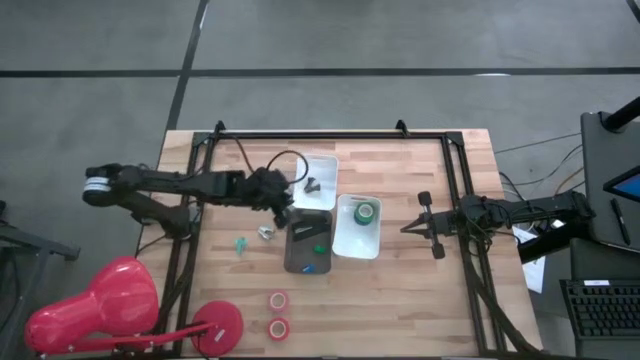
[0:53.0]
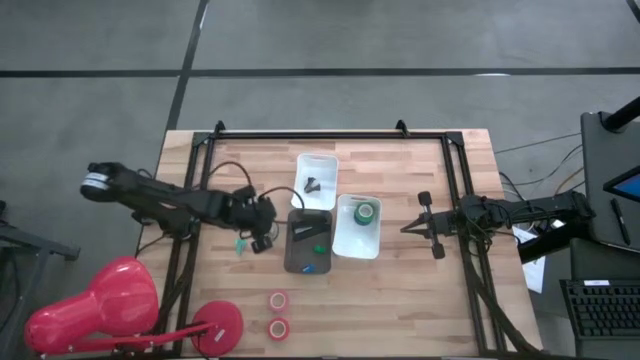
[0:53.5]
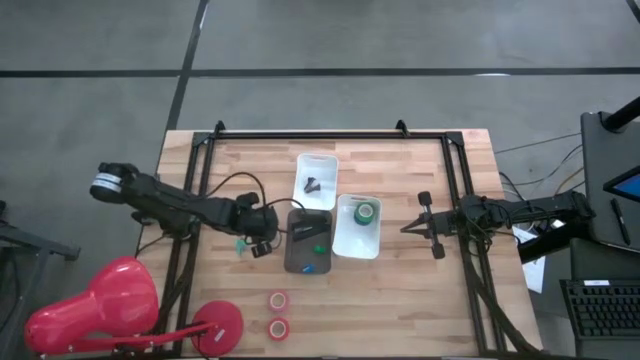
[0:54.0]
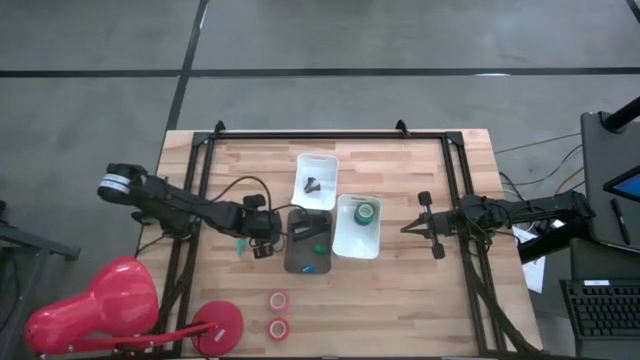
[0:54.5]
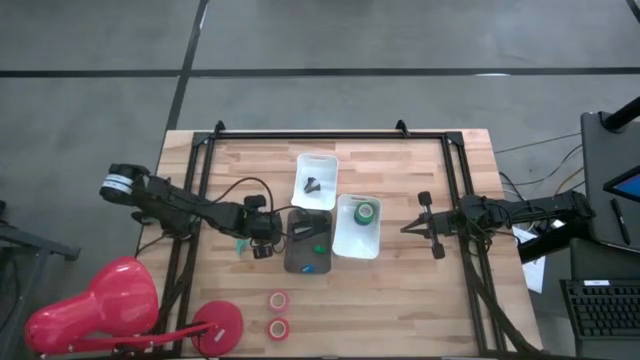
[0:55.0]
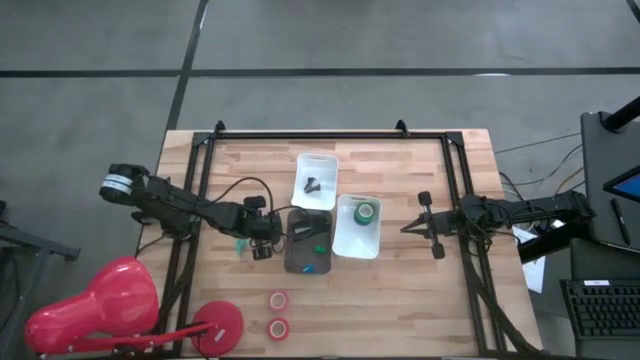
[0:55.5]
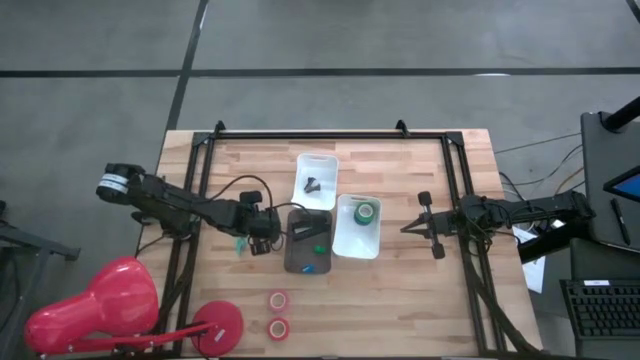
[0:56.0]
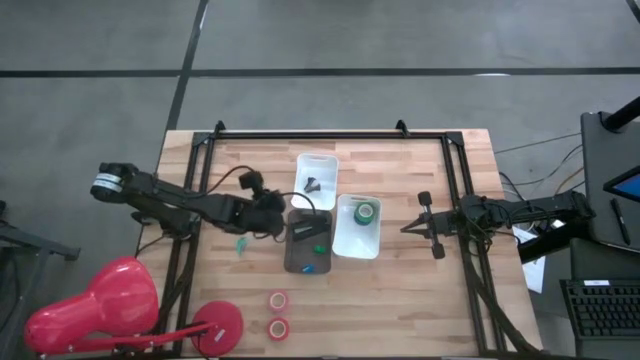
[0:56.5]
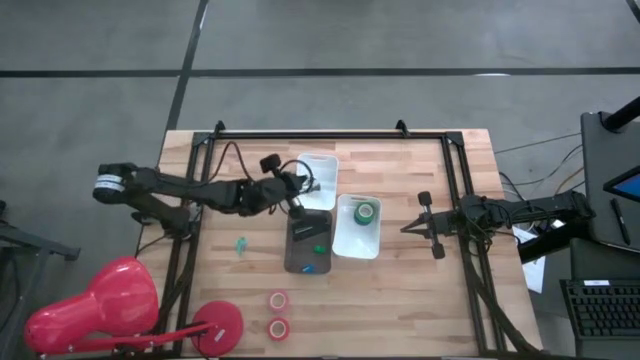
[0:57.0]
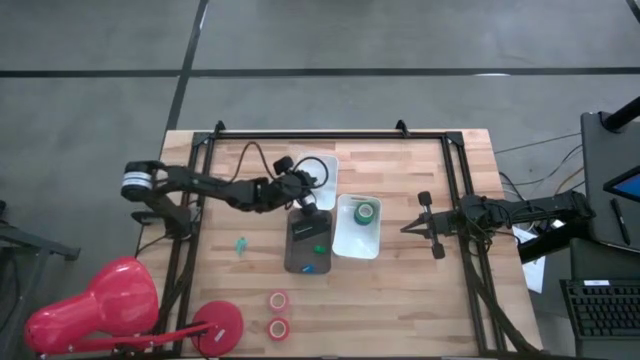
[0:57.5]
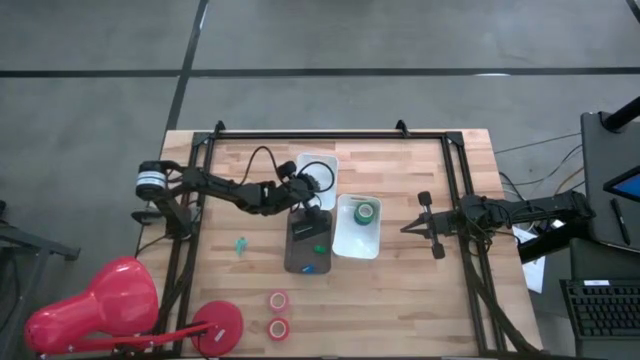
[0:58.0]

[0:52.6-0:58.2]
Task: Pick and place Stapler, Stapler remover, tape
Put the right green staple remover into the top white bin

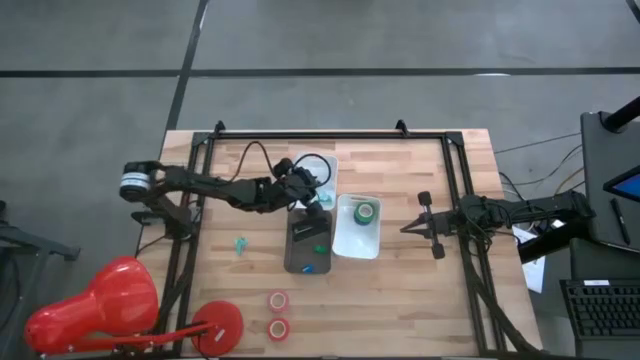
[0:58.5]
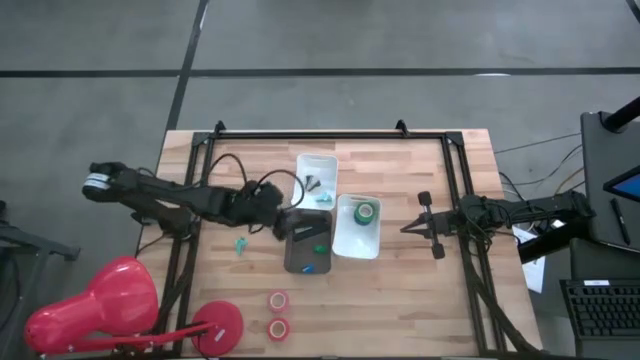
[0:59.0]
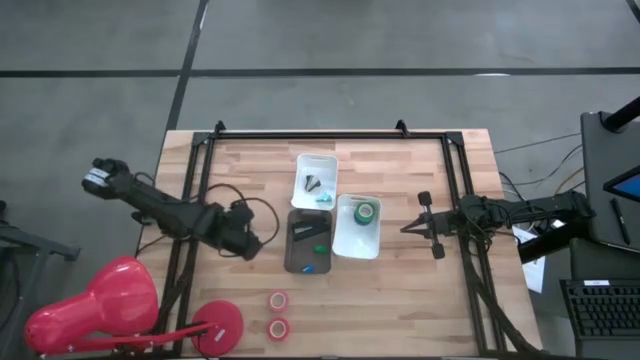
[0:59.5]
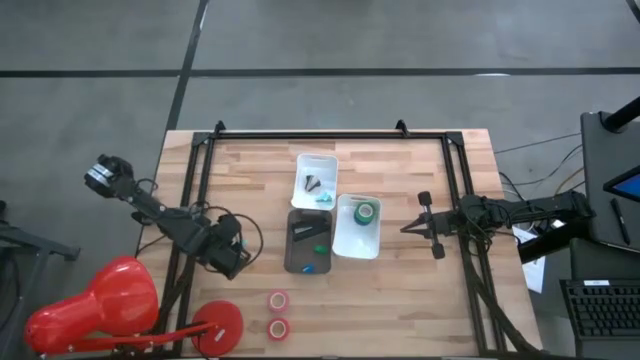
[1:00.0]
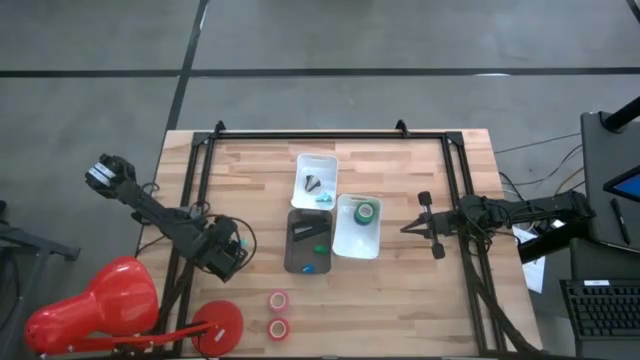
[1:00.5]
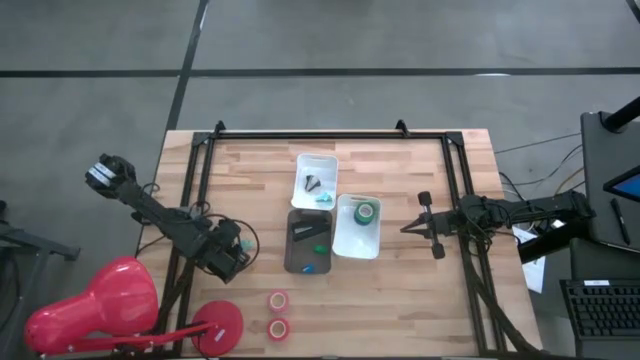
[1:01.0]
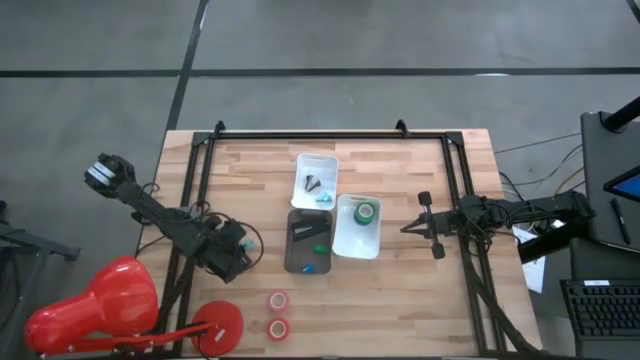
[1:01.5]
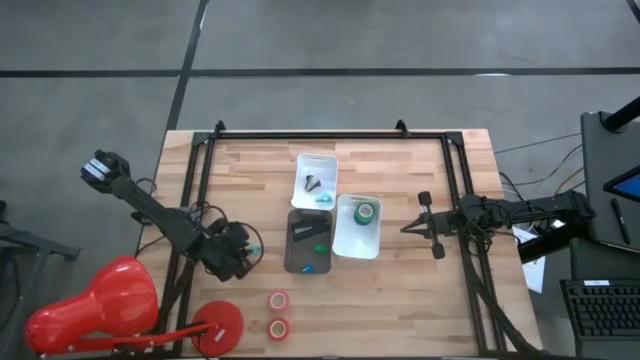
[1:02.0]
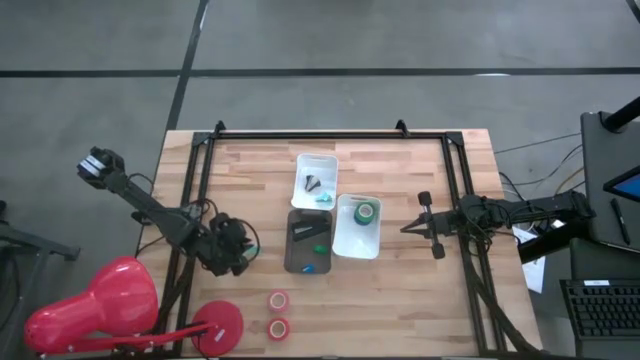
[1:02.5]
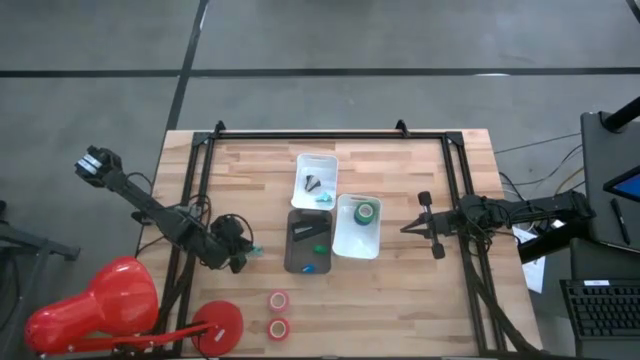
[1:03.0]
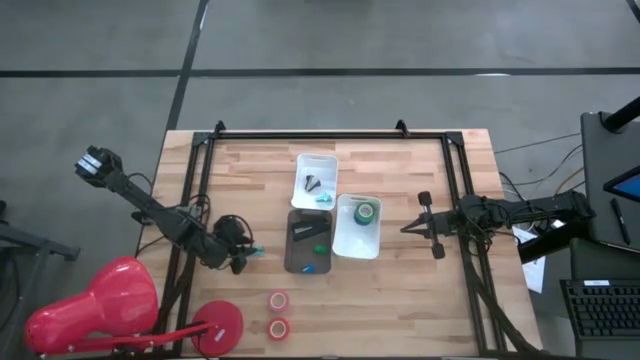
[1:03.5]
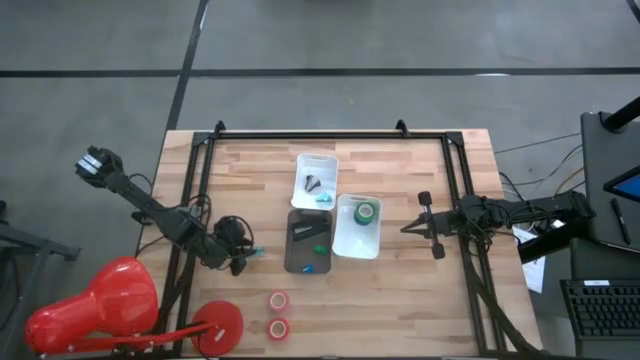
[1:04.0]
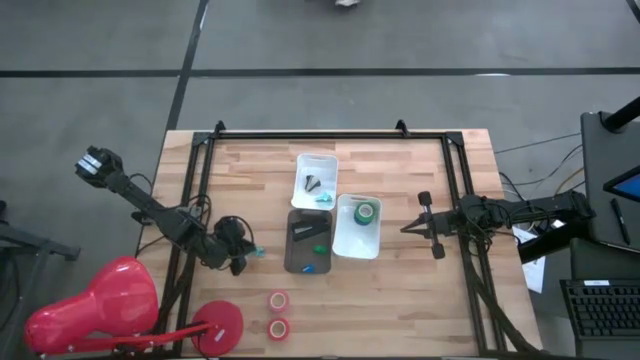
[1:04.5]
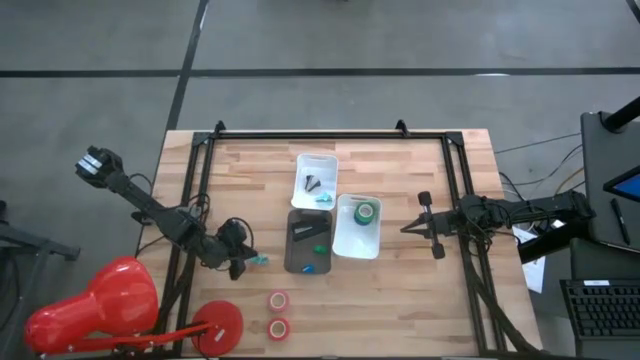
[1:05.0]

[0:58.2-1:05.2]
Put the green staple remover into the top white bin

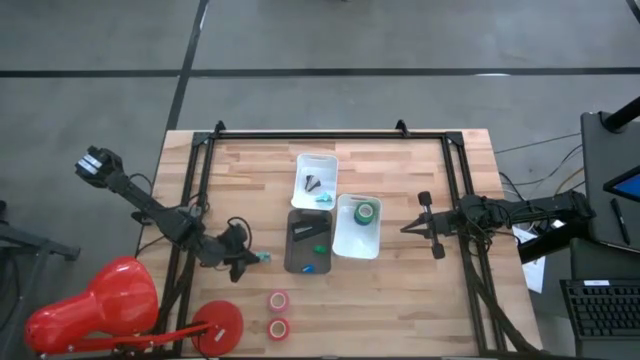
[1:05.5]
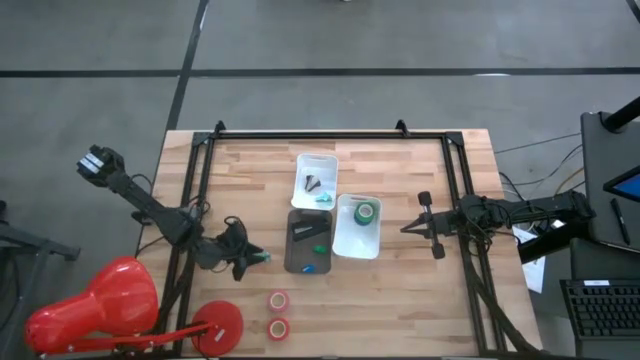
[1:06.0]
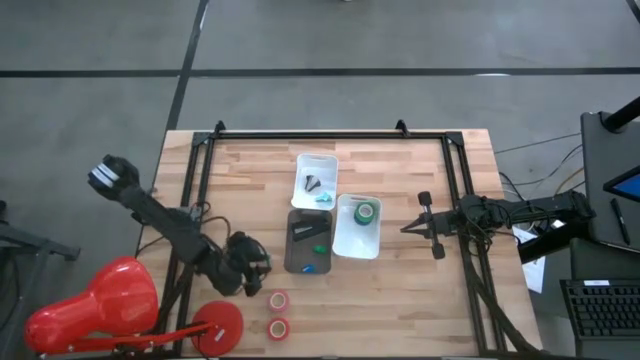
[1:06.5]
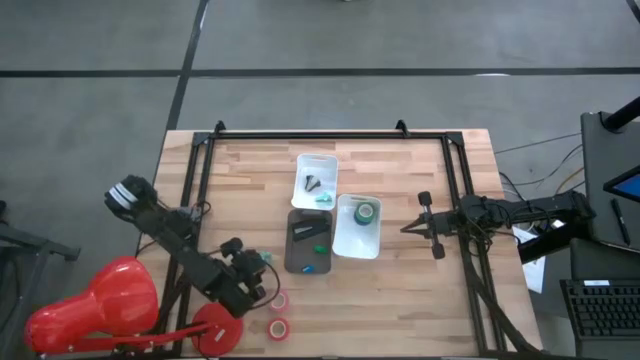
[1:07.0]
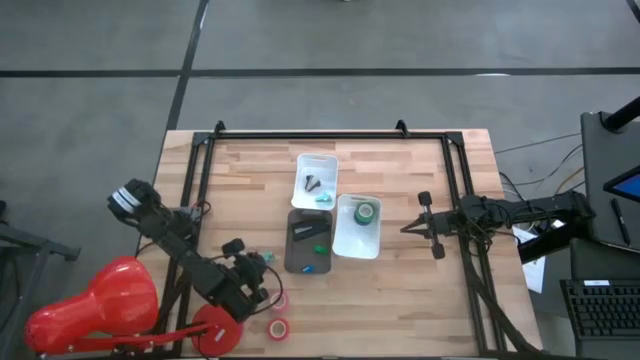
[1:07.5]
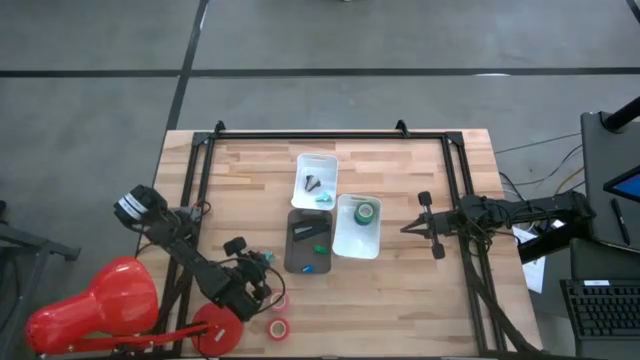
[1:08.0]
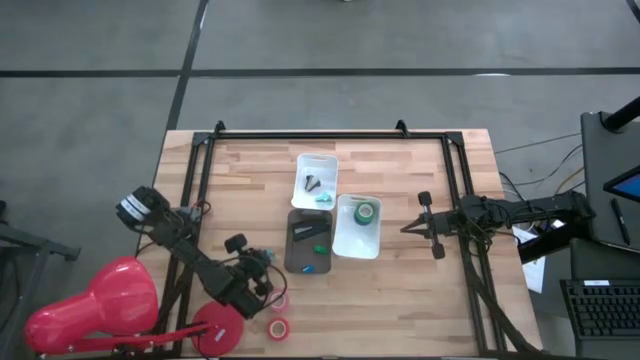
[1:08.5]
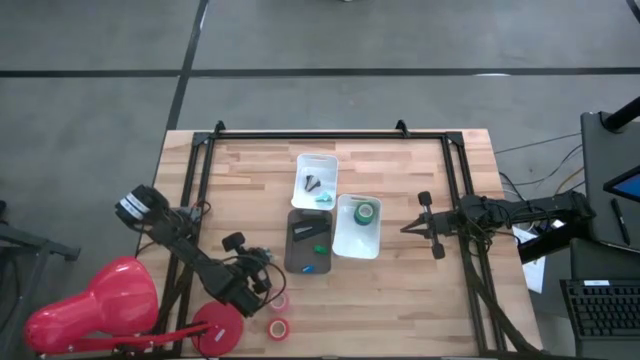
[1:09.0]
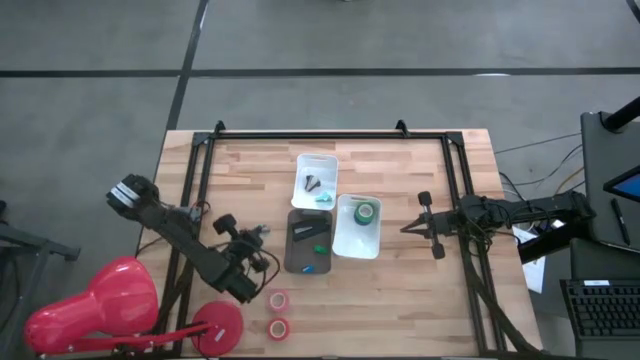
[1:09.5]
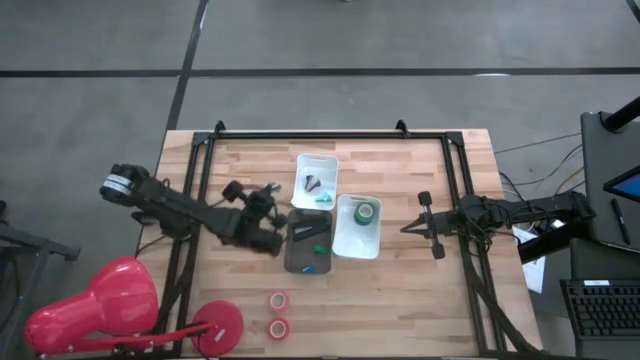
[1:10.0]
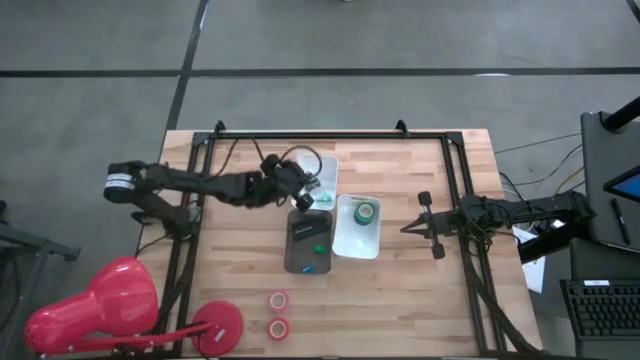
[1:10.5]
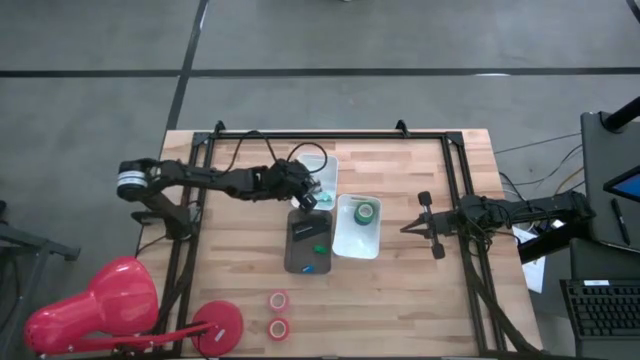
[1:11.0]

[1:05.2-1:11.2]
Put the green staple remover into the top white bin

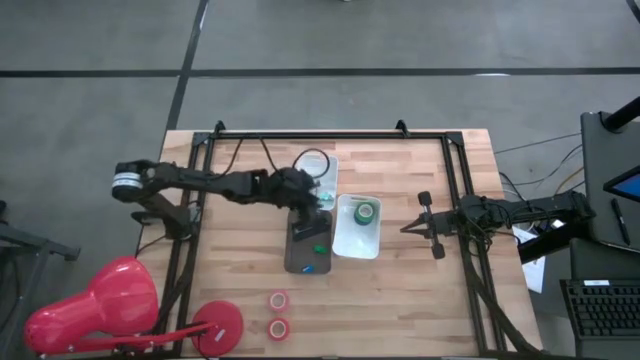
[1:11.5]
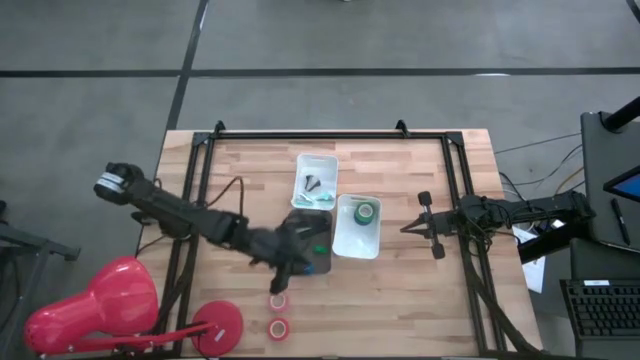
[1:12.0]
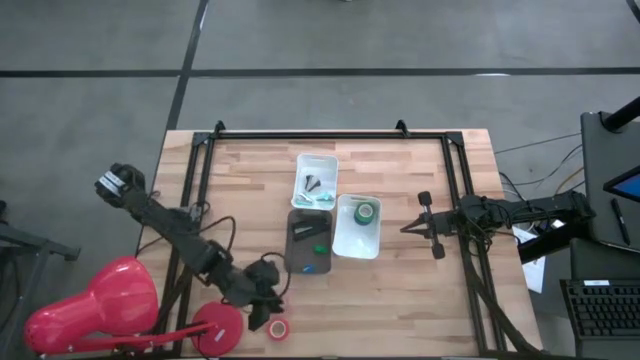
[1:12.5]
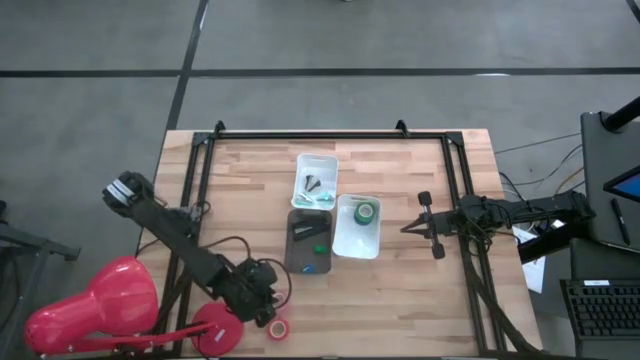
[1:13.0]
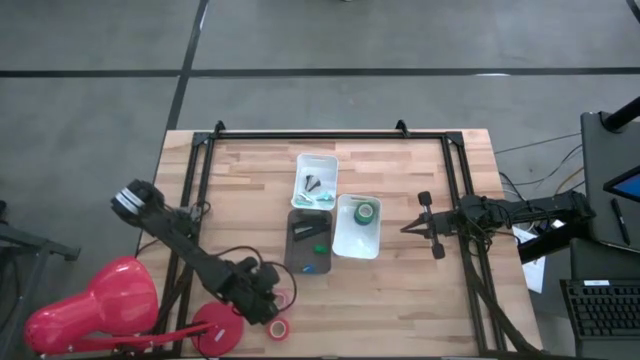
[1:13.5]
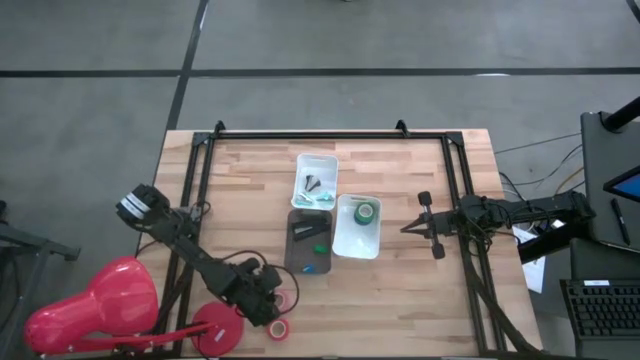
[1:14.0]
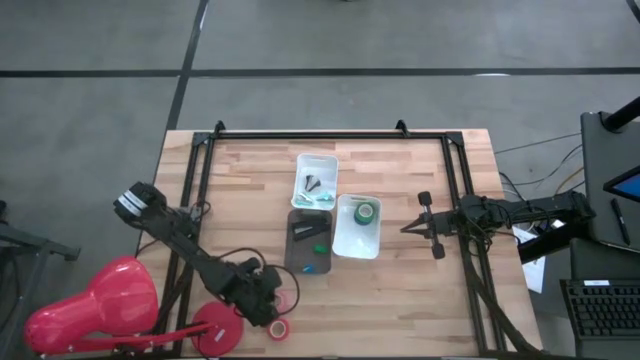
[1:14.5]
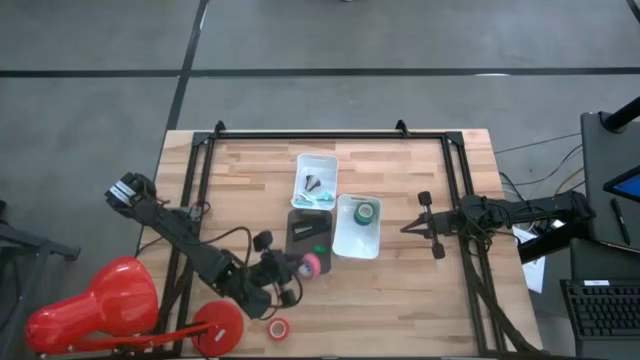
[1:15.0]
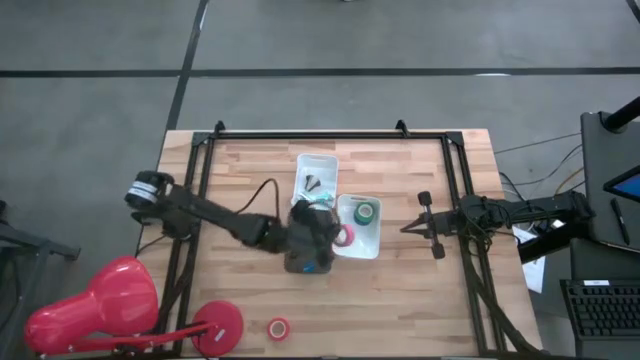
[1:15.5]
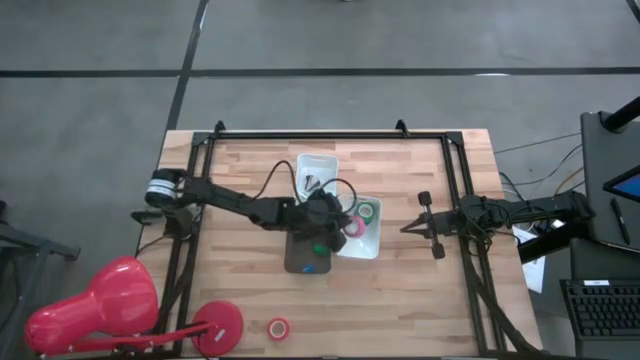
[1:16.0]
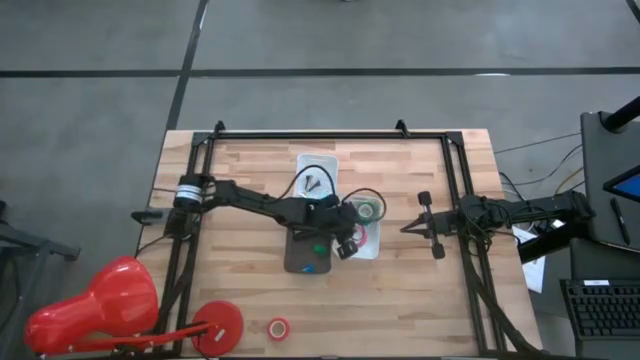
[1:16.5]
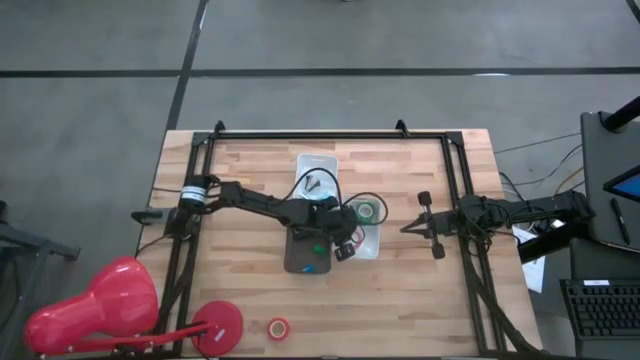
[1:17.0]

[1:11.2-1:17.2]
Put the pink tape into the bottom white bin
